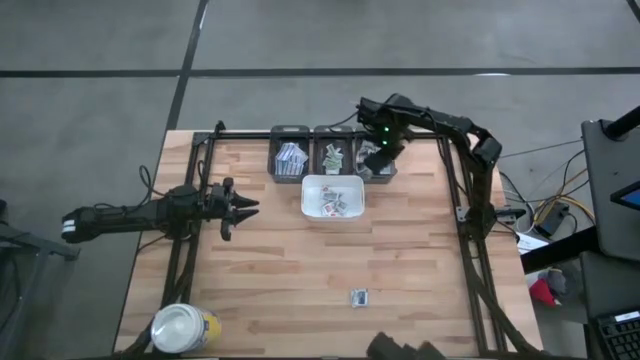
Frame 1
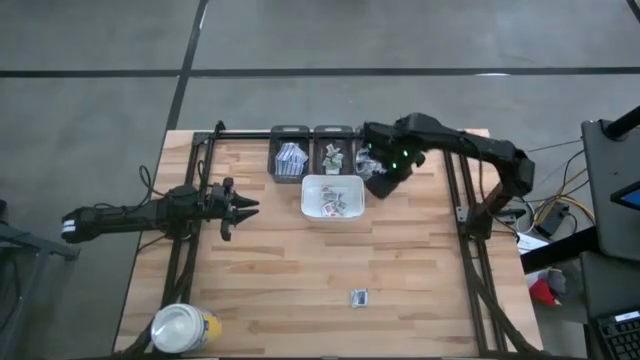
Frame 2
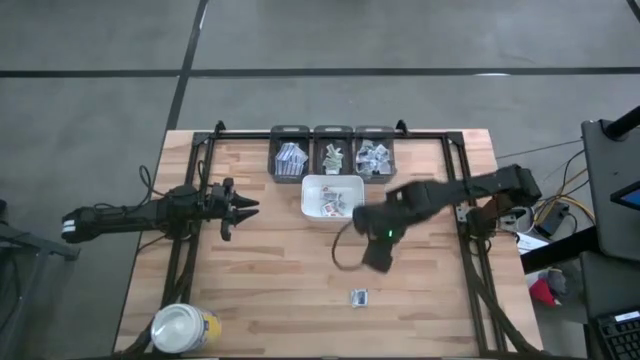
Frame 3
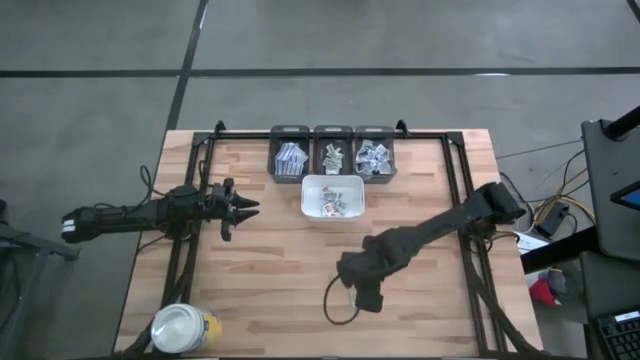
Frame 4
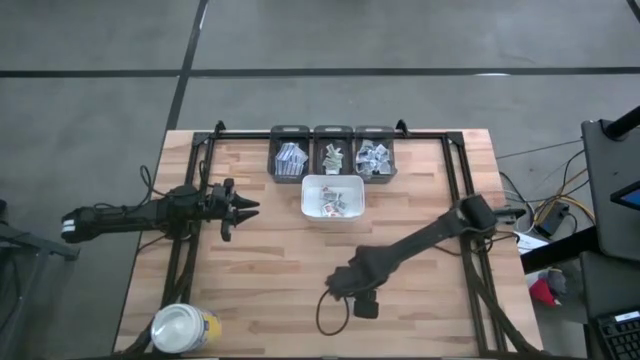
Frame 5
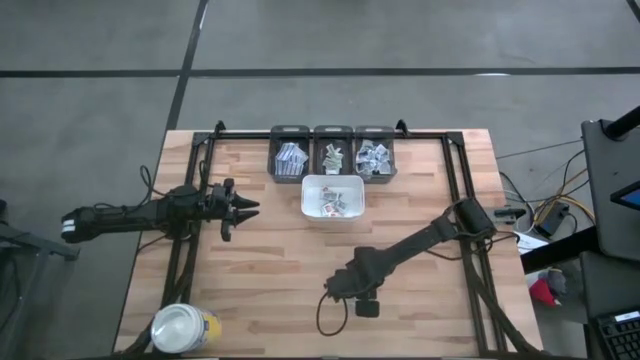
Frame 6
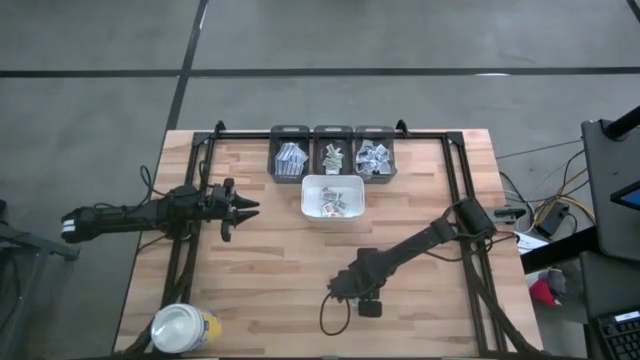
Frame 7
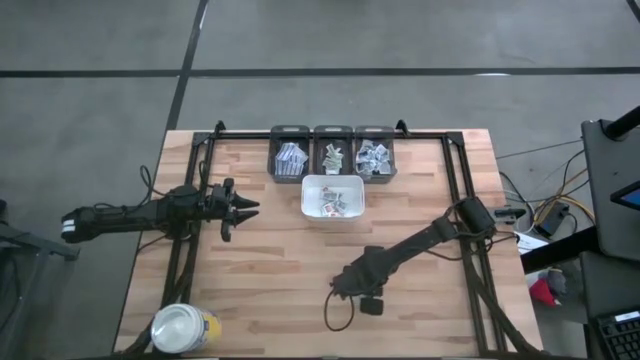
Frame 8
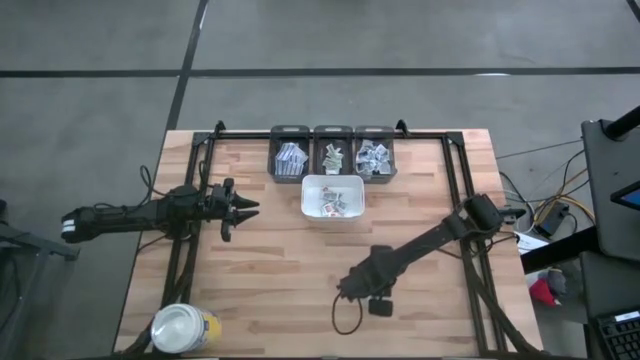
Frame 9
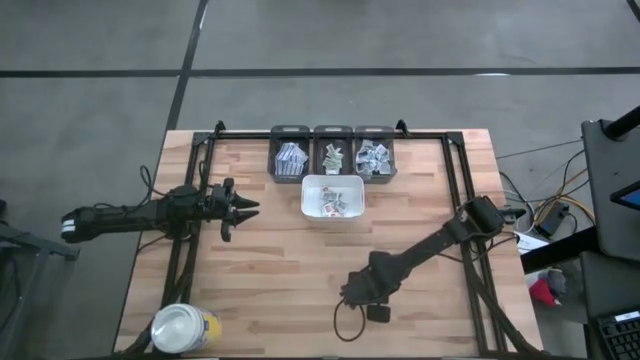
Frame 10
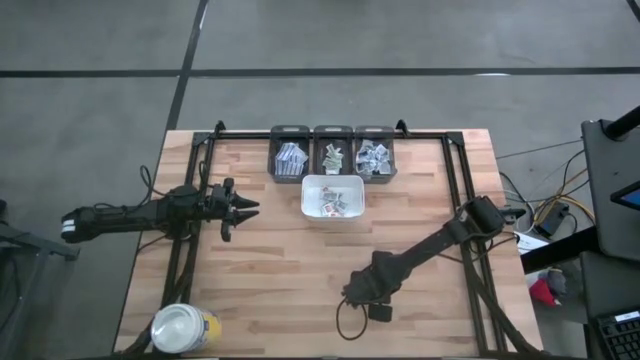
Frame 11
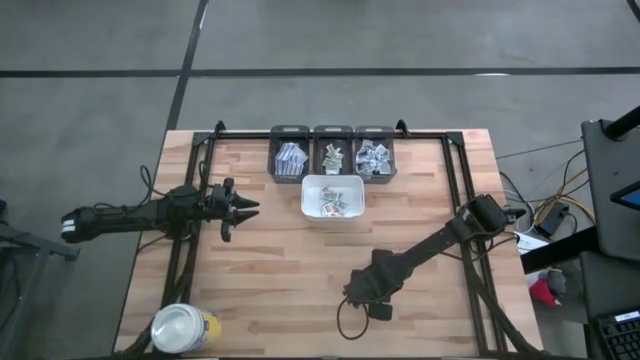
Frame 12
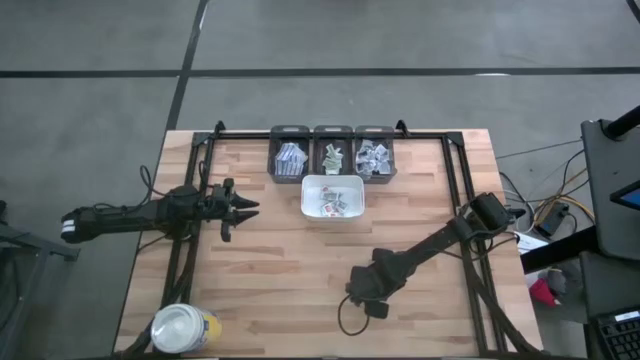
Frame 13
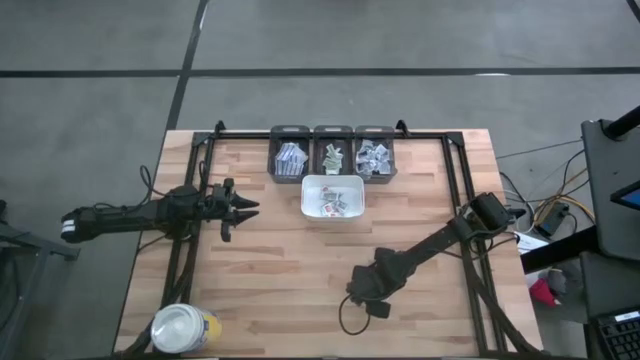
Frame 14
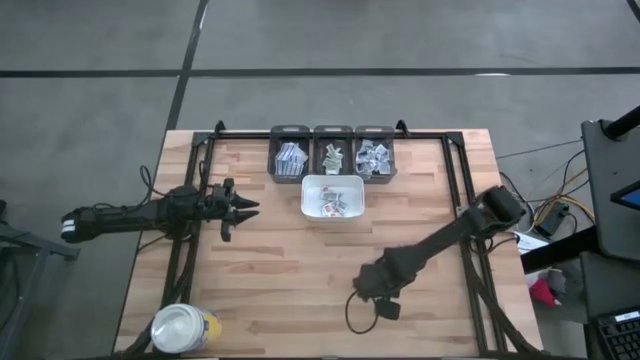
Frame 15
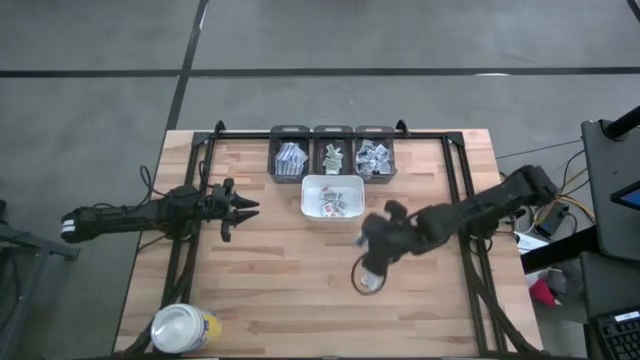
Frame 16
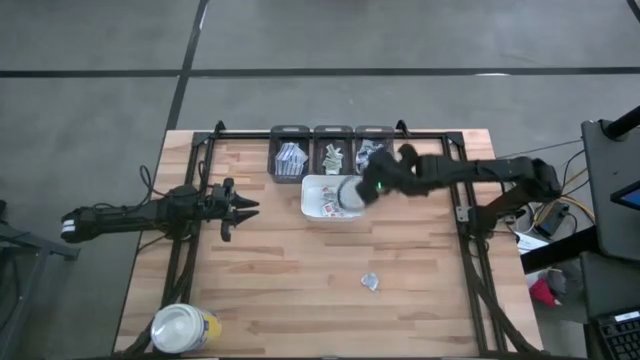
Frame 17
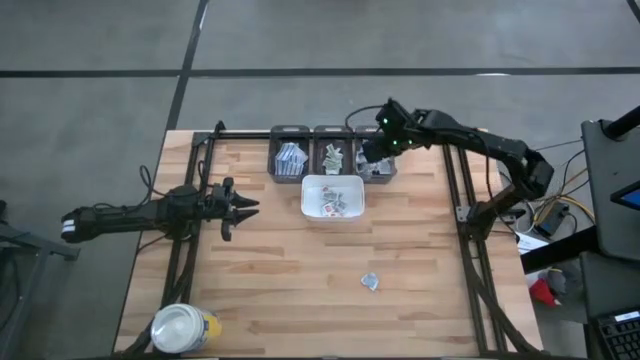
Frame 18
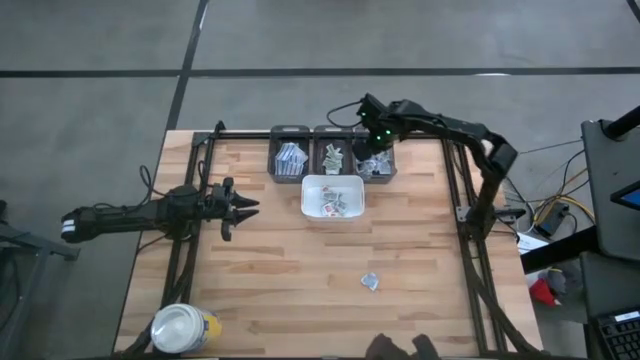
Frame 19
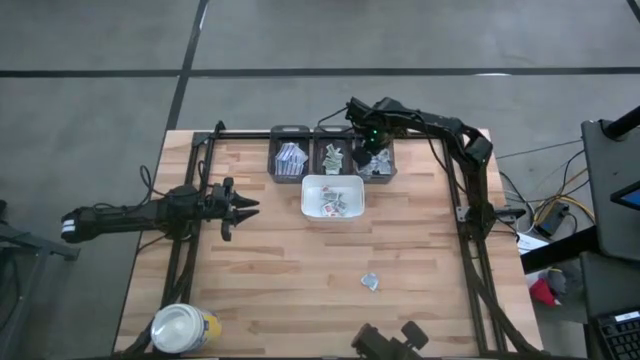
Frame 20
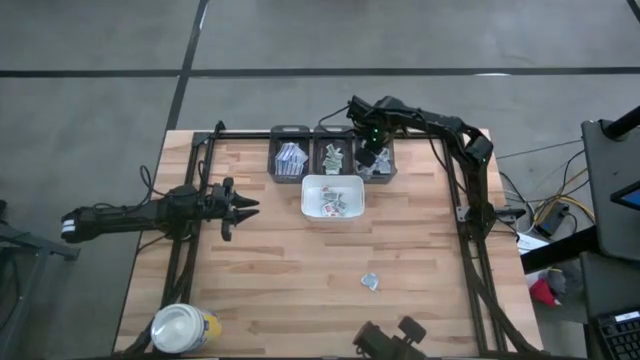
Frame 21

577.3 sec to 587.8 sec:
Task: Pick & Place First Aid Supplies
Put the white alcohol pad into the right black bin

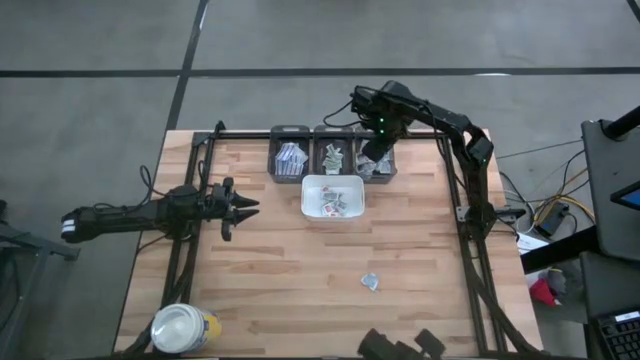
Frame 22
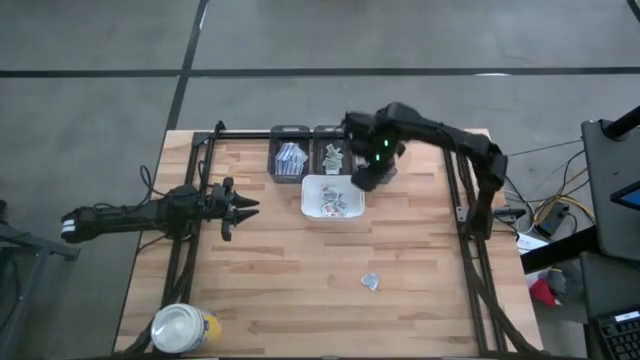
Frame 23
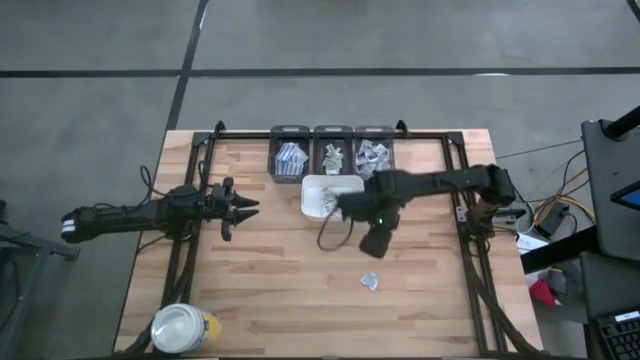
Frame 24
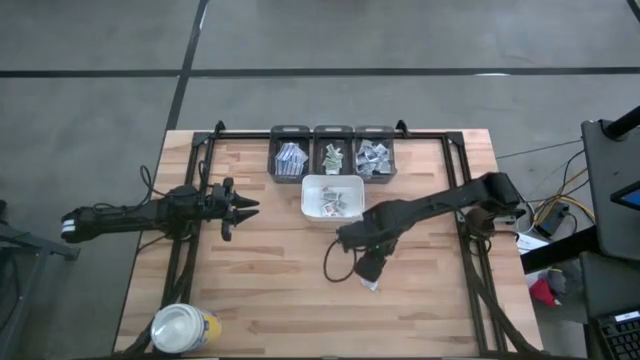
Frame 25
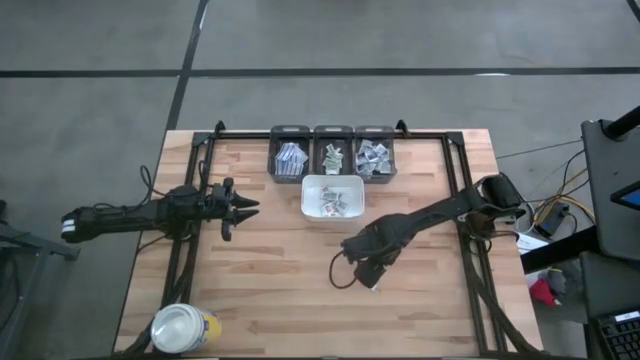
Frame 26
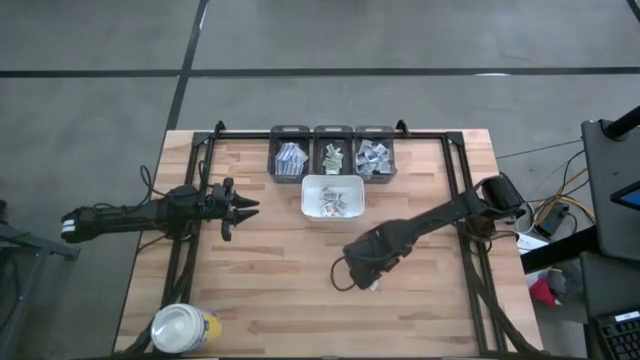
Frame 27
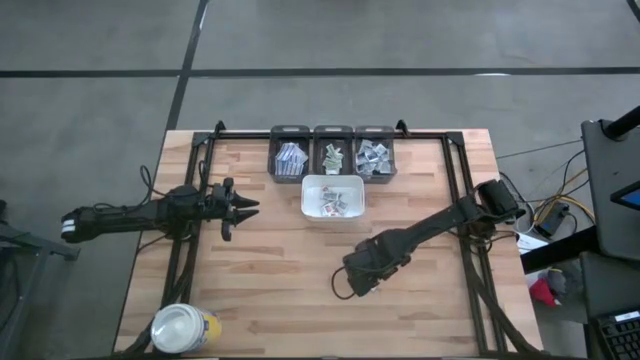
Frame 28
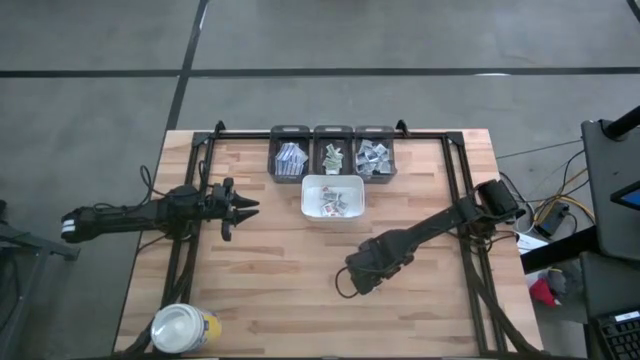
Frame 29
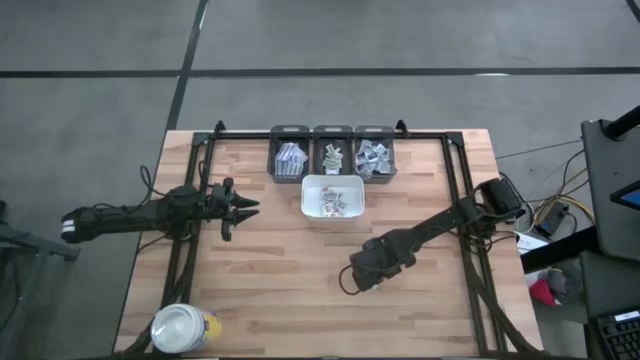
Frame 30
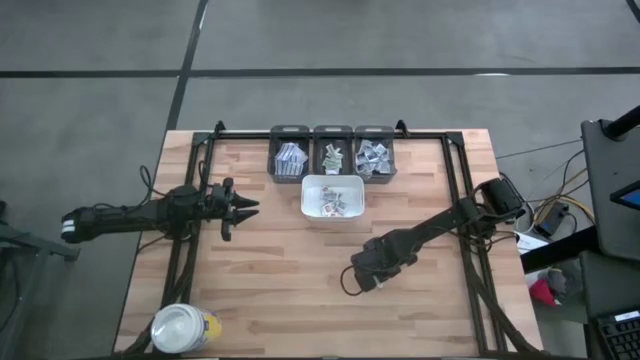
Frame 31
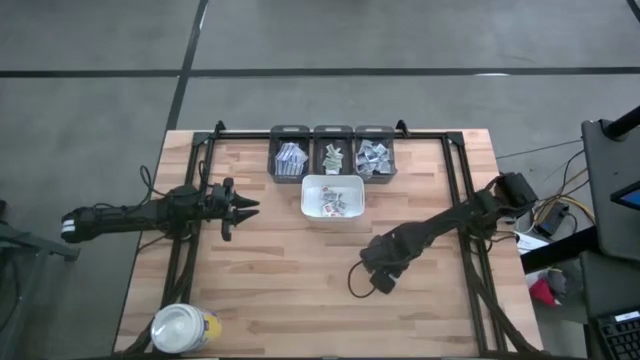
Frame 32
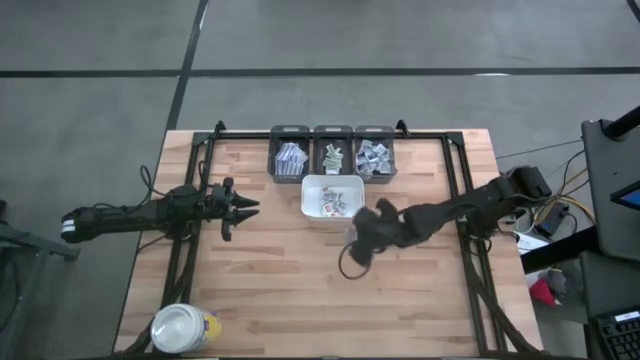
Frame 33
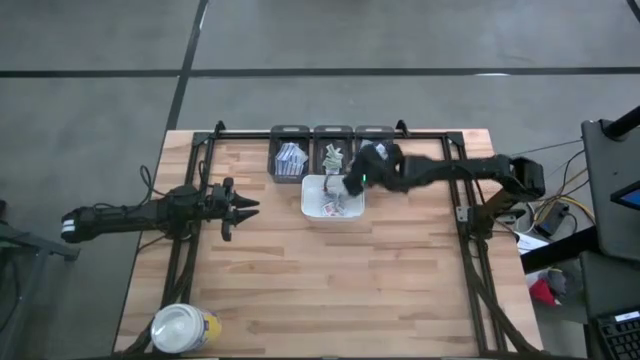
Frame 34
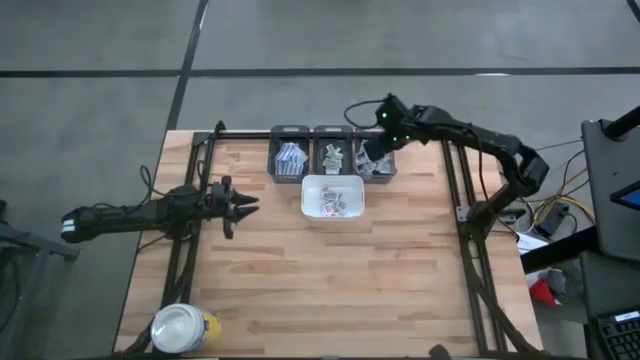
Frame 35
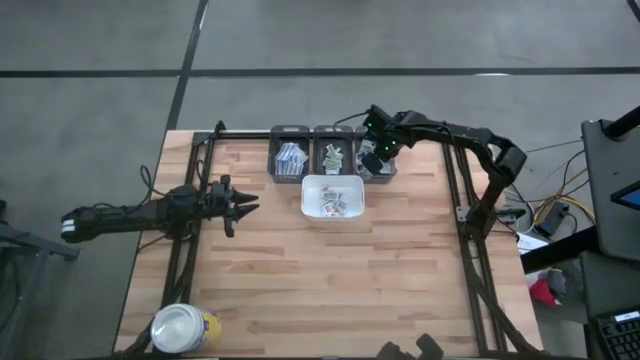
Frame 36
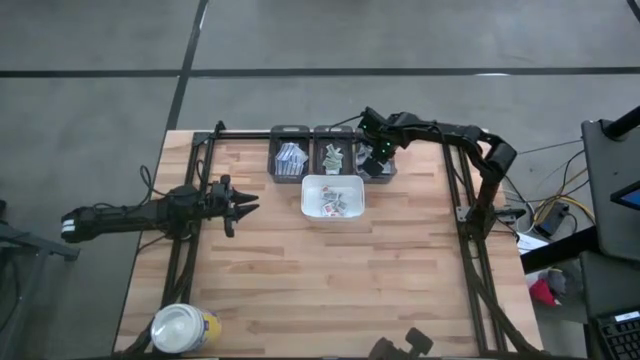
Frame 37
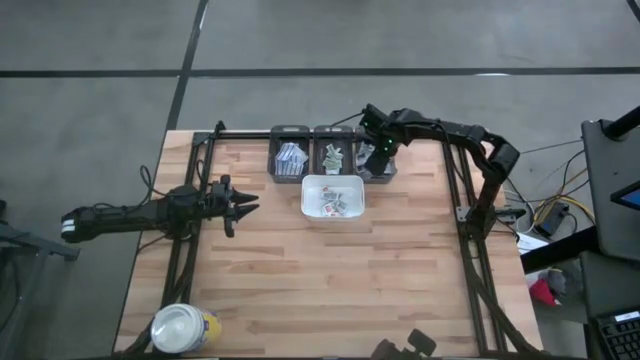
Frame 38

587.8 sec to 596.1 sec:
Put the white alcohol pad into the right black bin

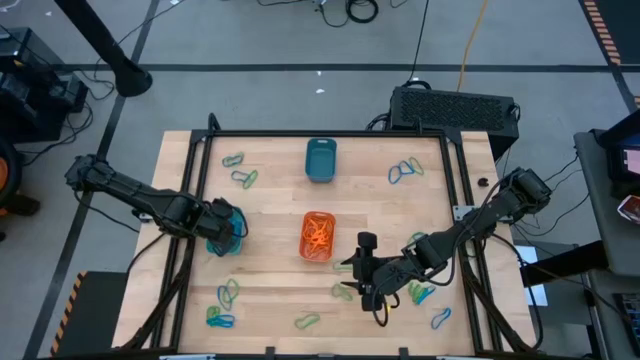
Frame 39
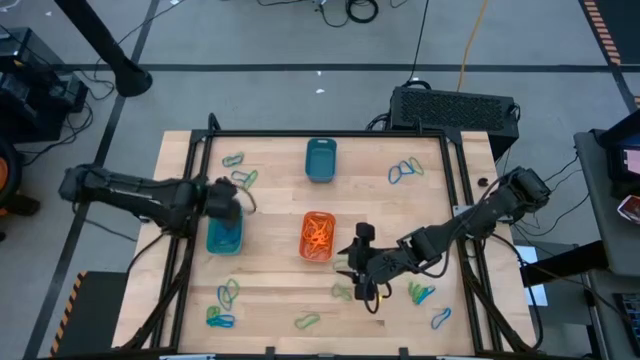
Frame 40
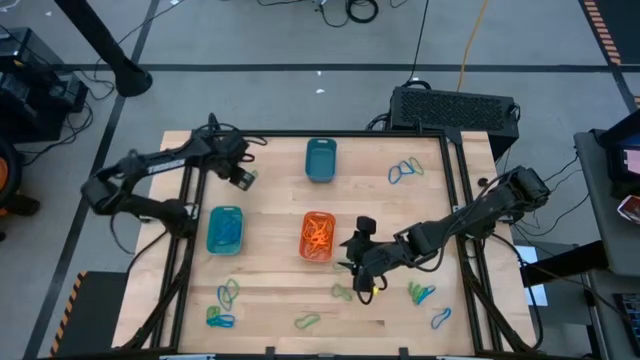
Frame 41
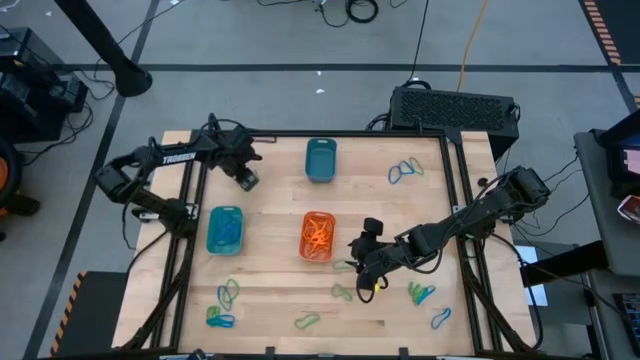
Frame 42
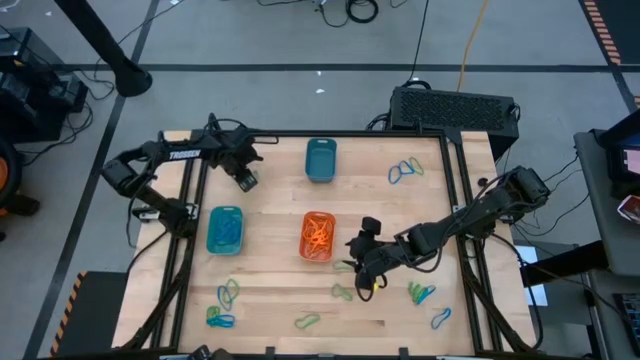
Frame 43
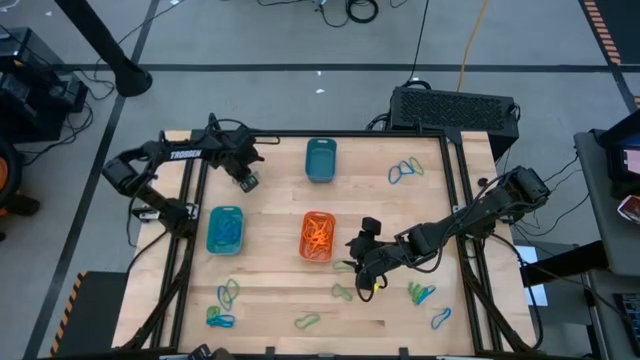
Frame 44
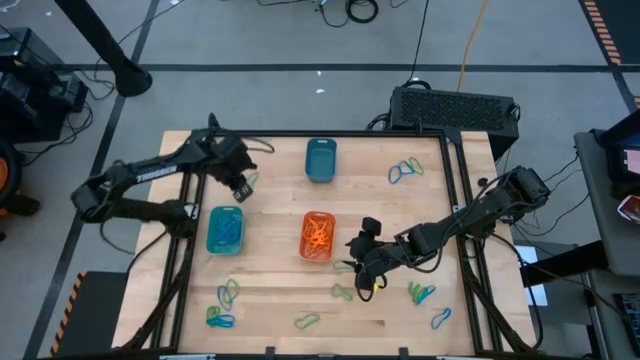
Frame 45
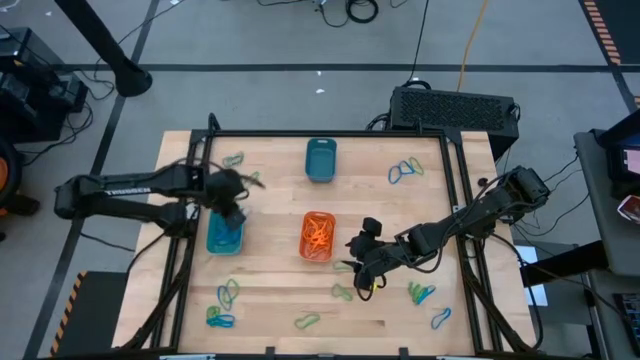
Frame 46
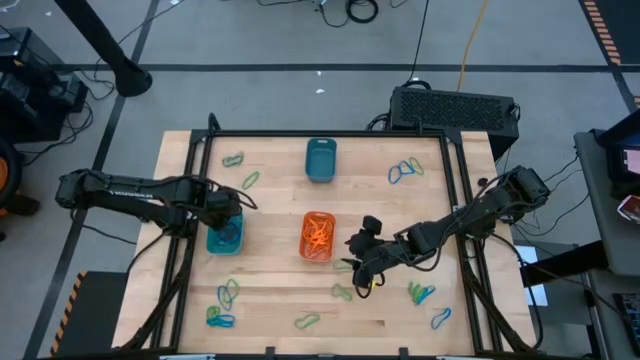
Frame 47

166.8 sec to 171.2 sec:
Task: Sort rubber bands into baskets
Put the blue rubber band into the green bin
